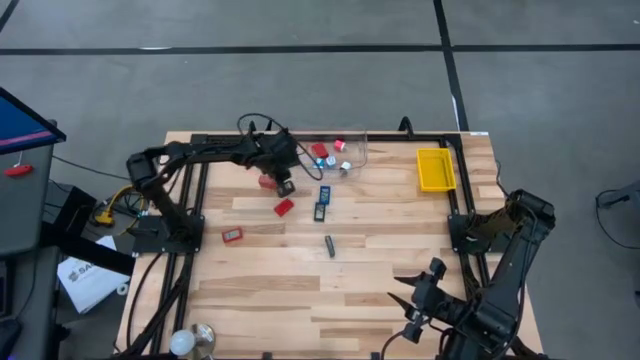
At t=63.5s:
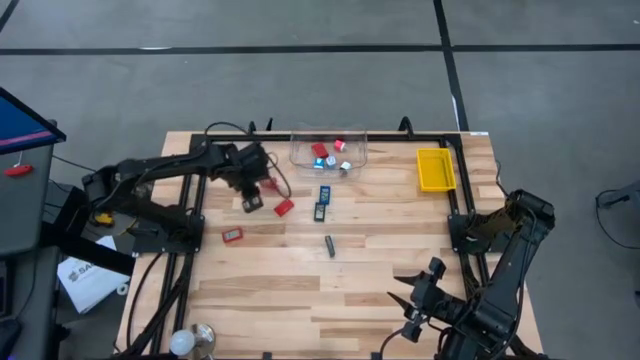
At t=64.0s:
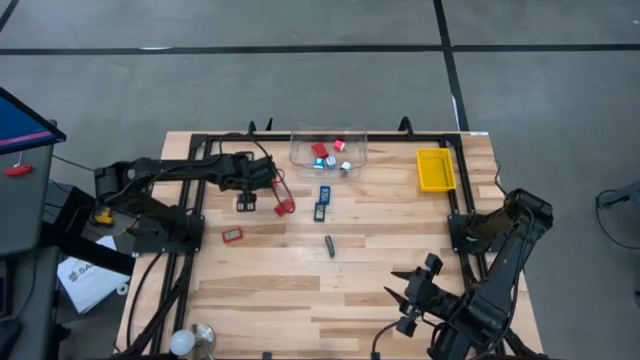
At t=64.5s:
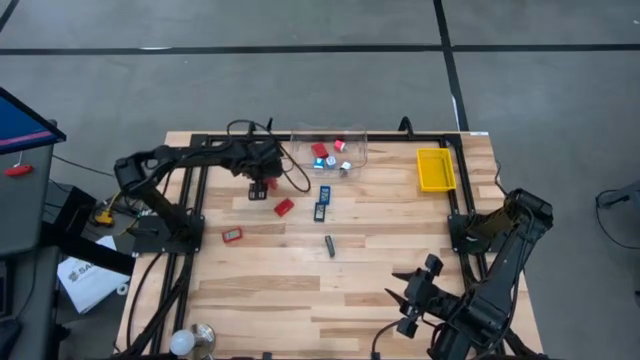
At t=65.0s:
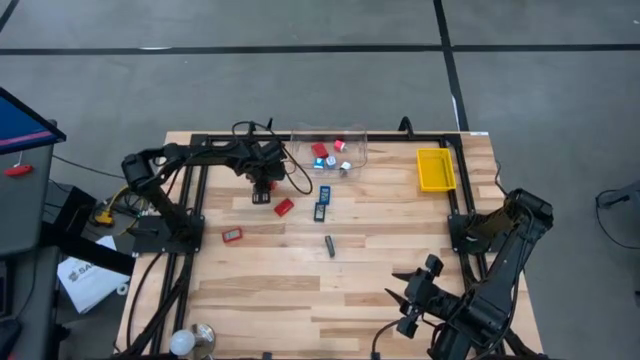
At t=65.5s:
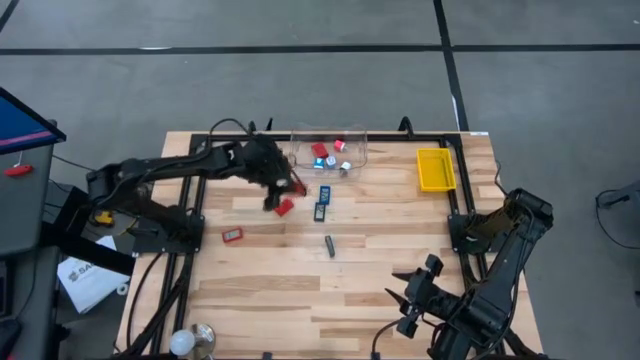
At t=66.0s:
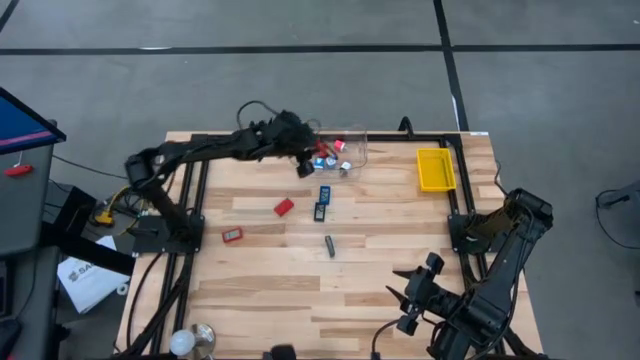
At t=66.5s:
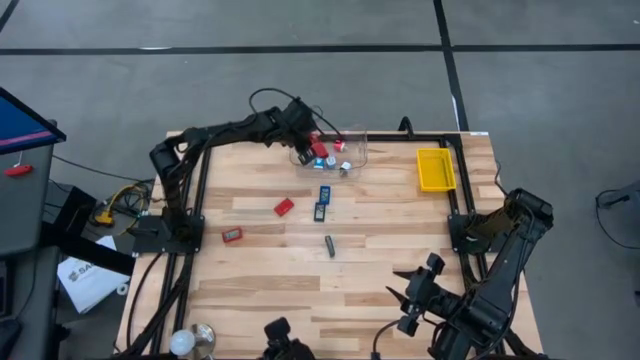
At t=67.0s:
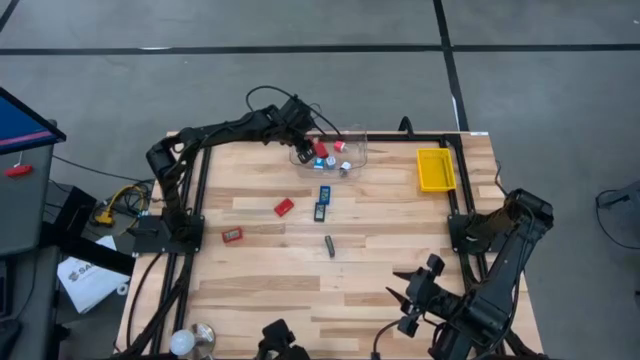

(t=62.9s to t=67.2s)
Task: Pick & Place Office items
Put the red charger adapter into the transparent bin

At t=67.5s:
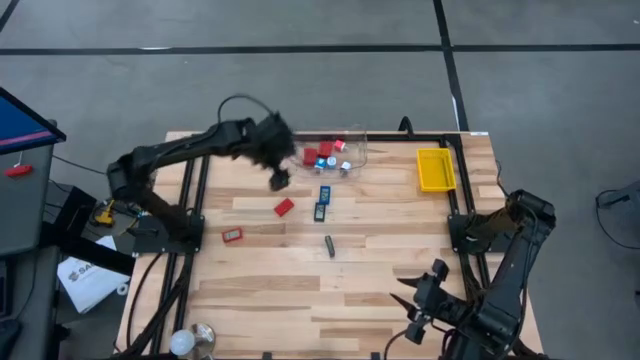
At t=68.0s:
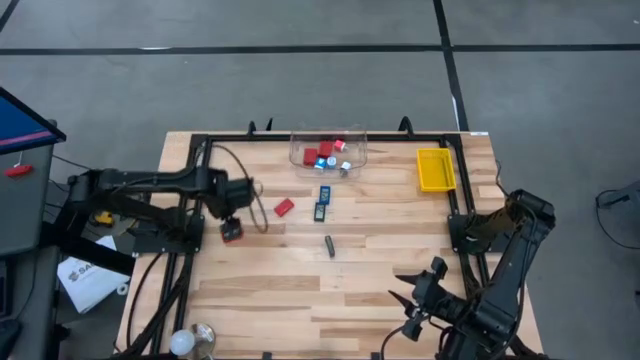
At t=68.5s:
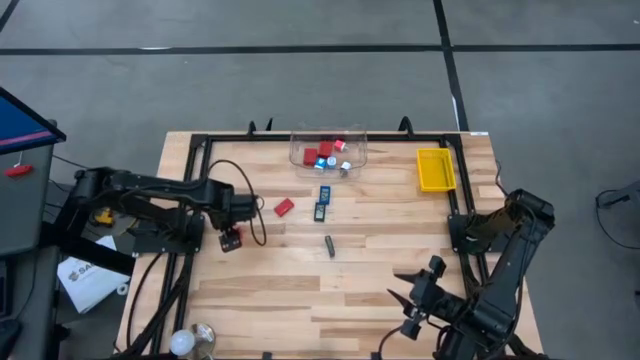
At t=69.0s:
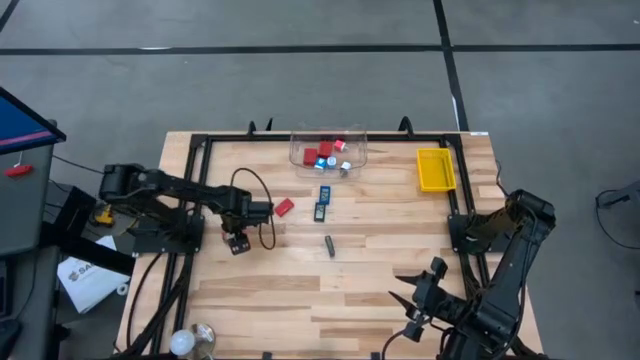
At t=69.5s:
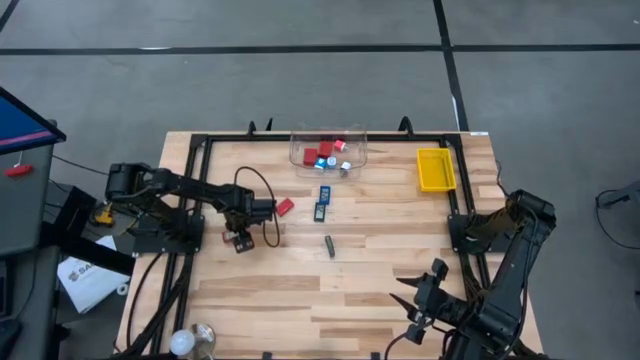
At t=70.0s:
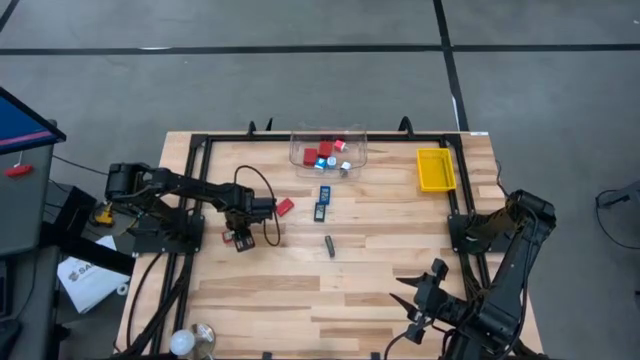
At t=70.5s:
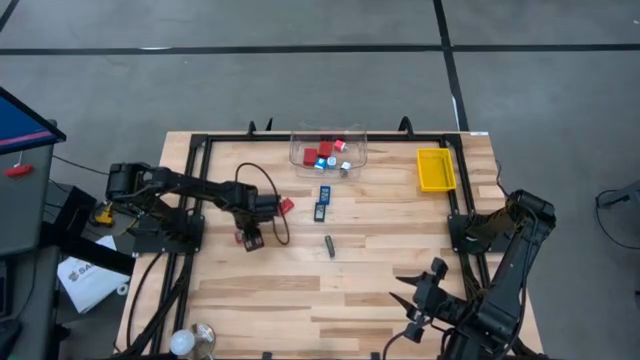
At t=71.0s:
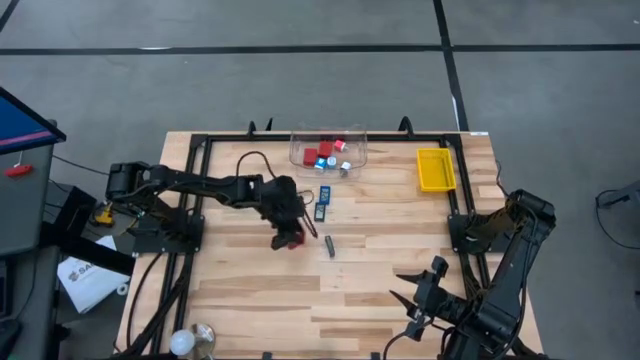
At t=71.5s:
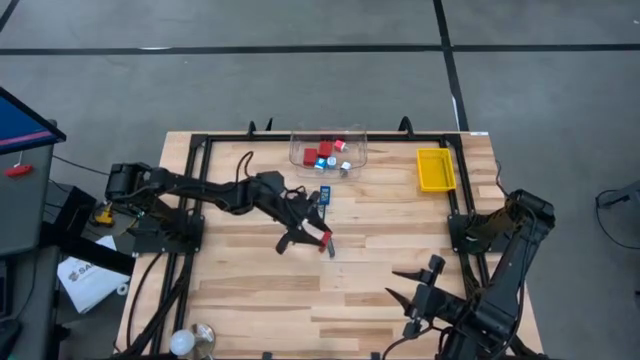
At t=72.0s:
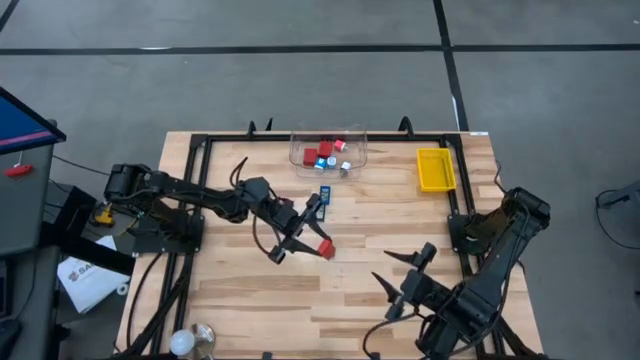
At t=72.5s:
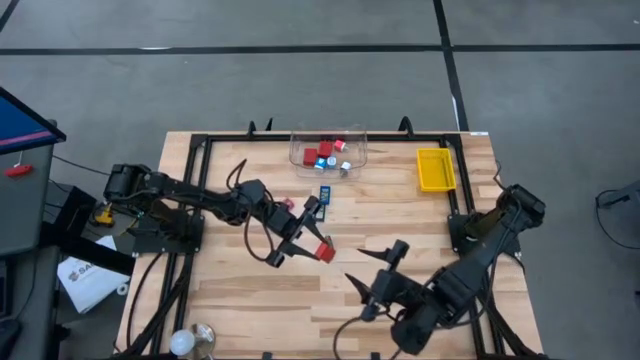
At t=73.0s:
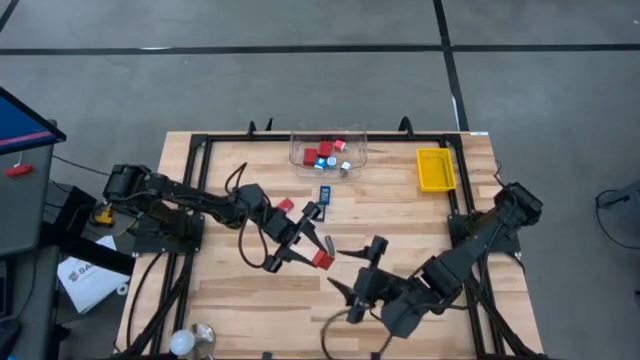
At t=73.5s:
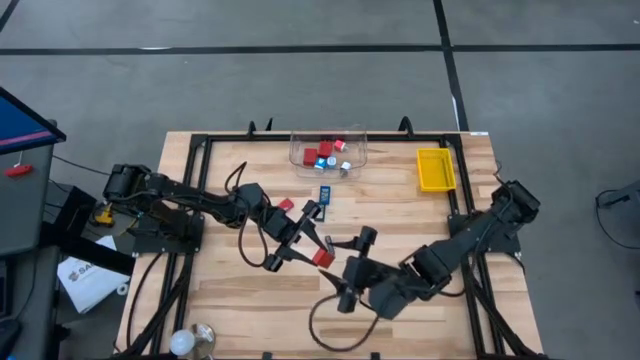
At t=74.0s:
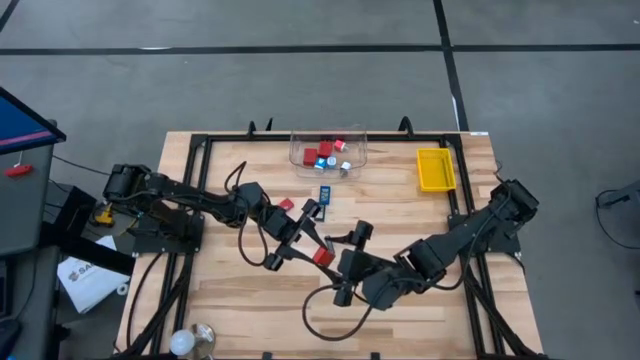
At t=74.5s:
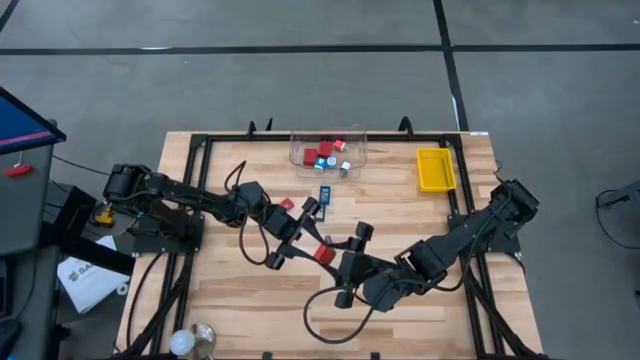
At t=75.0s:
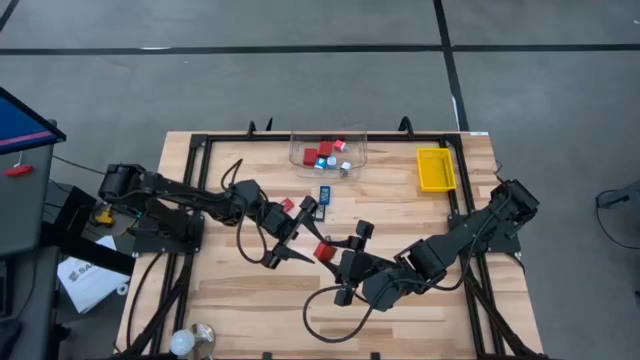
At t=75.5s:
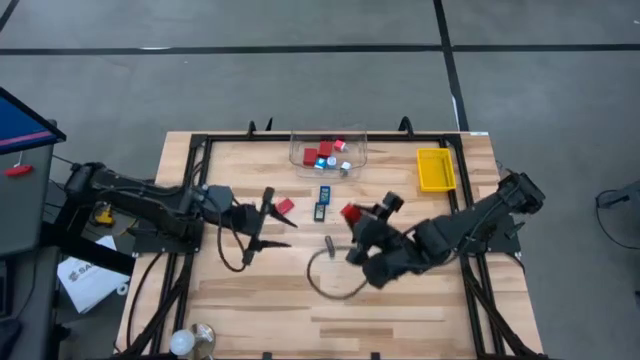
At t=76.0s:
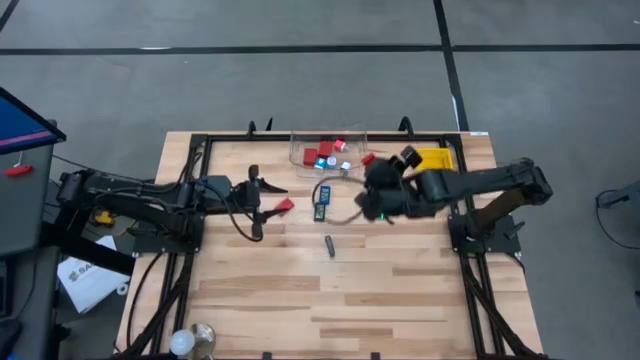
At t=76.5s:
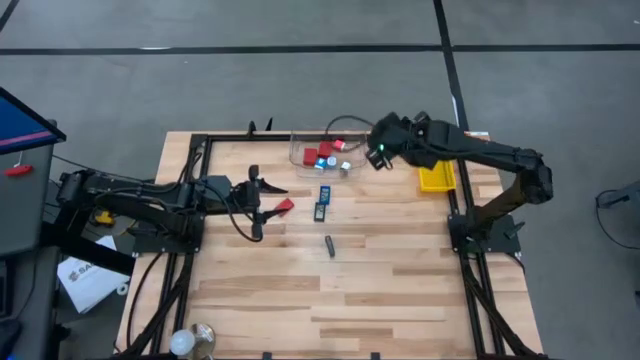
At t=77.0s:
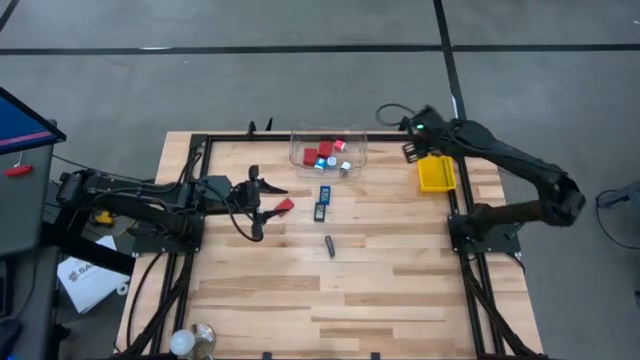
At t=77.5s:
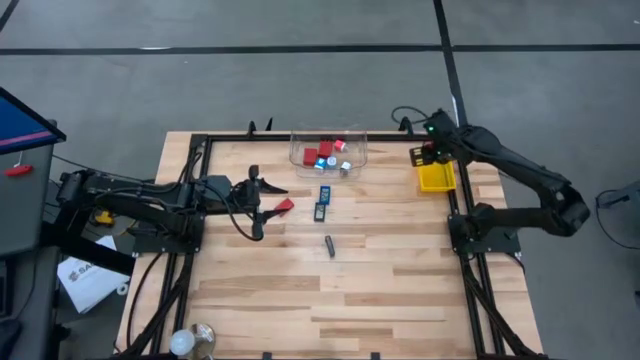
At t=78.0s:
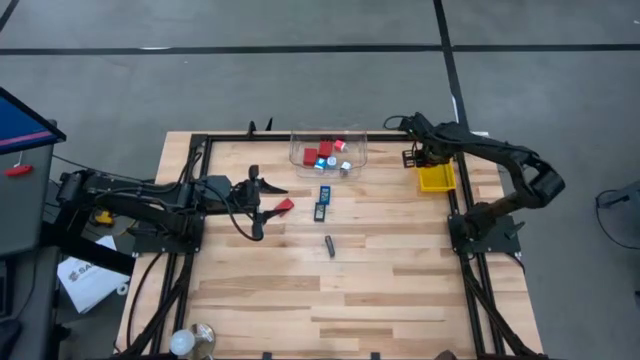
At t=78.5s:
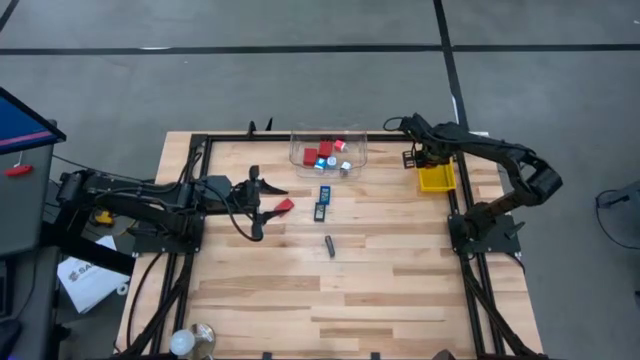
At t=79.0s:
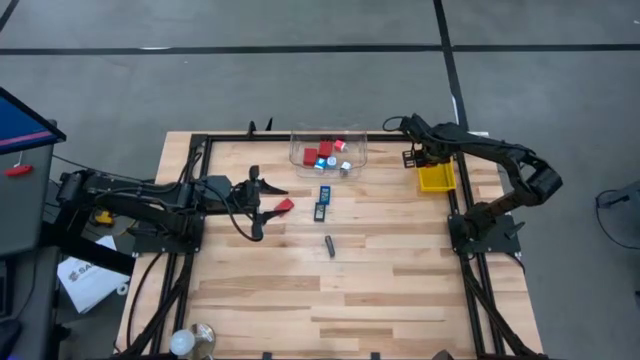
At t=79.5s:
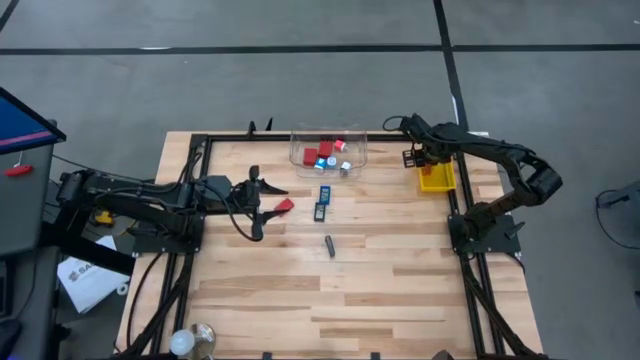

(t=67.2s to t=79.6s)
Put the left red digital clock into the yellow bin

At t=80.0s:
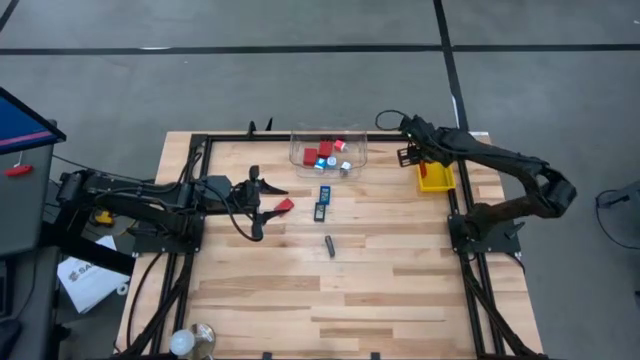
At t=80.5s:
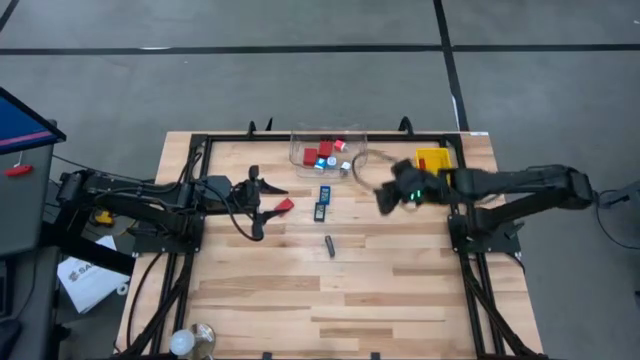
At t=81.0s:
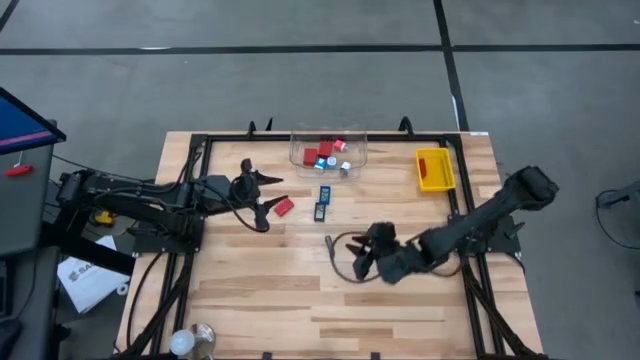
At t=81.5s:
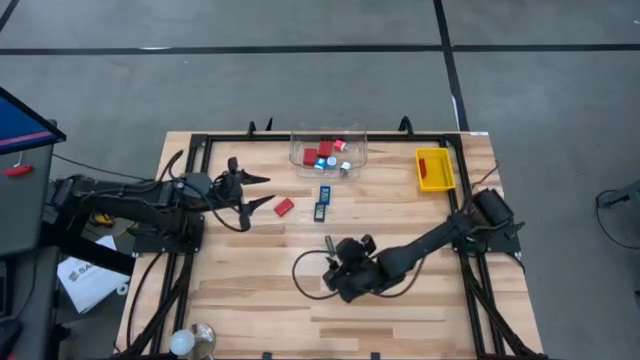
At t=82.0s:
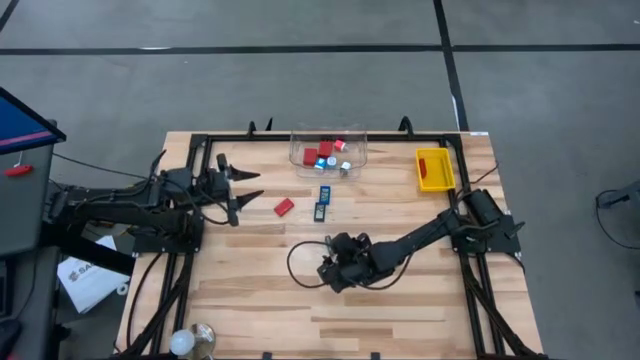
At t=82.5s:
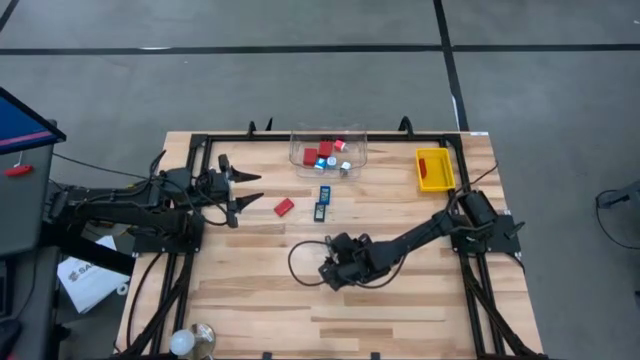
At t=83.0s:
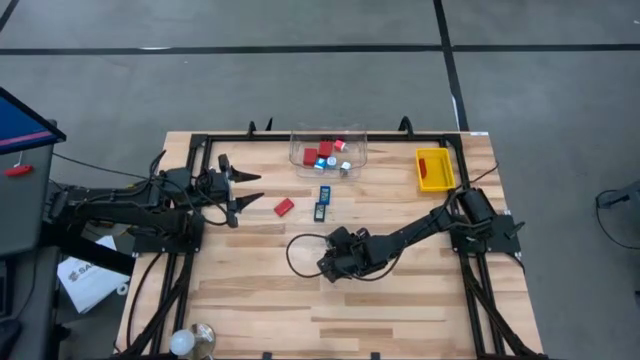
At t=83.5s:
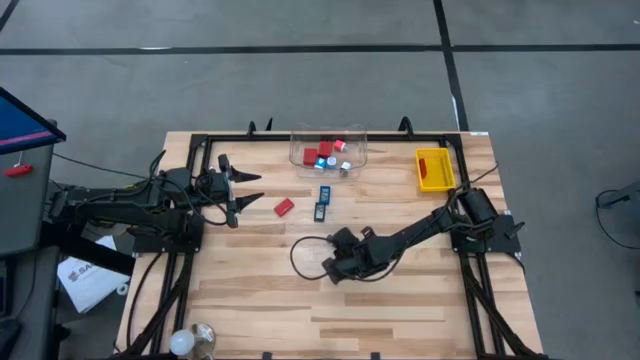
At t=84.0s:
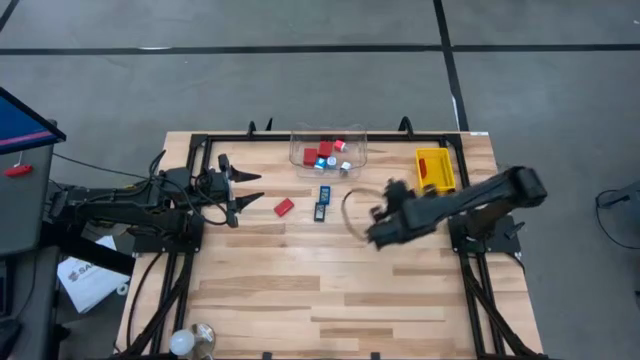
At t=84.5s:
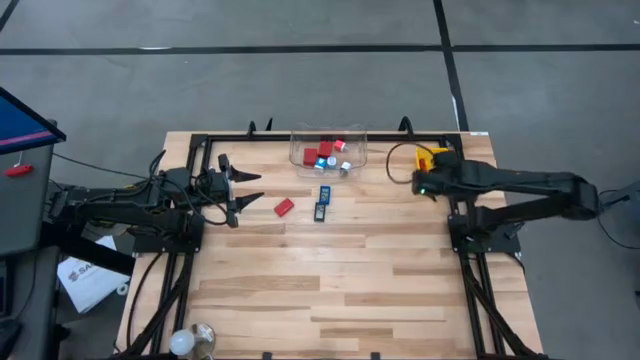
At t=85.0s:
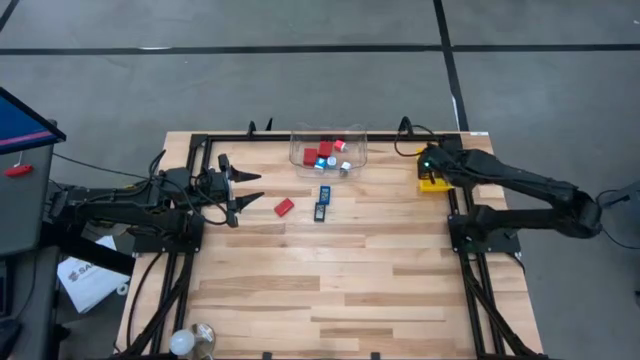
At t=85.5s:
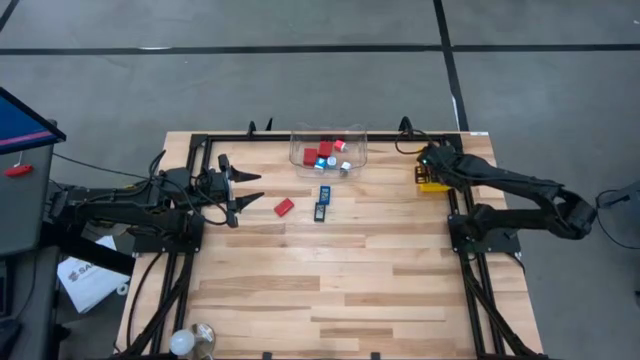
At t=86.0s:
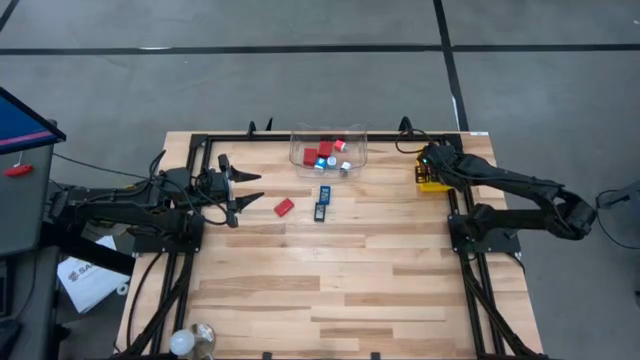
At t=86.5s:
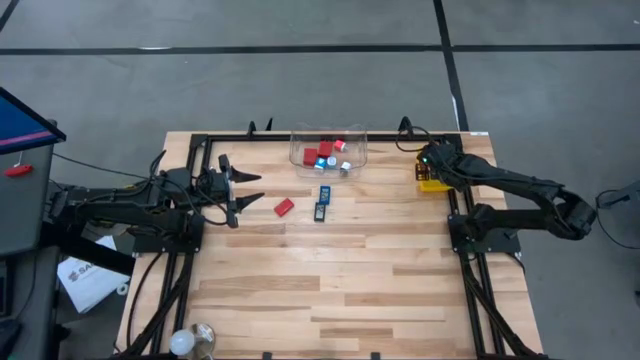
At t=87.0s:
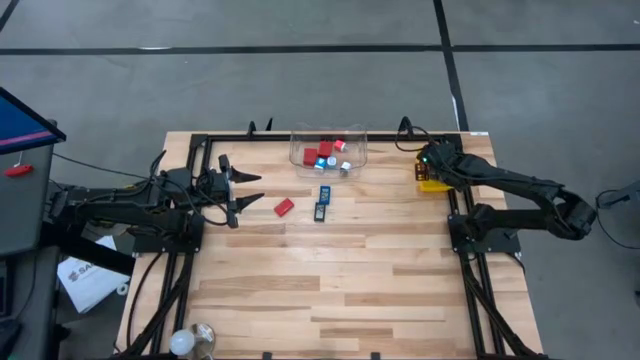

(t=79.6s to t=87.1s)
Put the bottom black digital clock into the yellow bin
